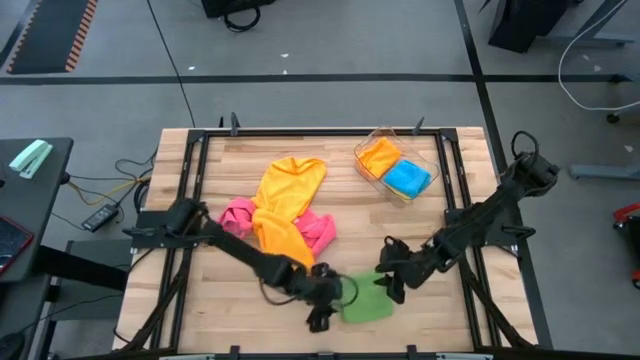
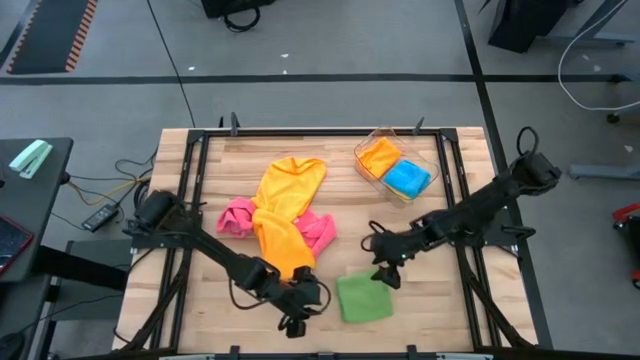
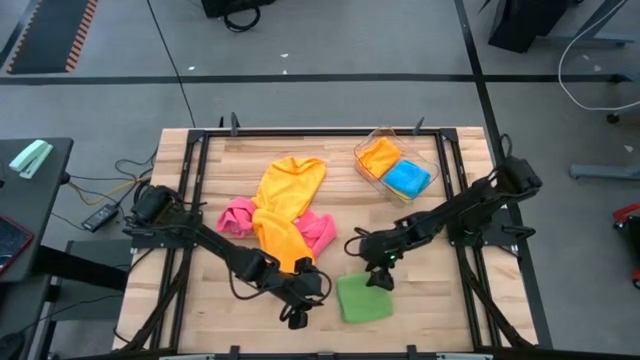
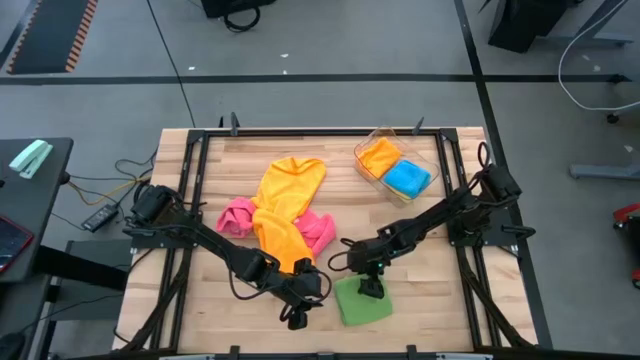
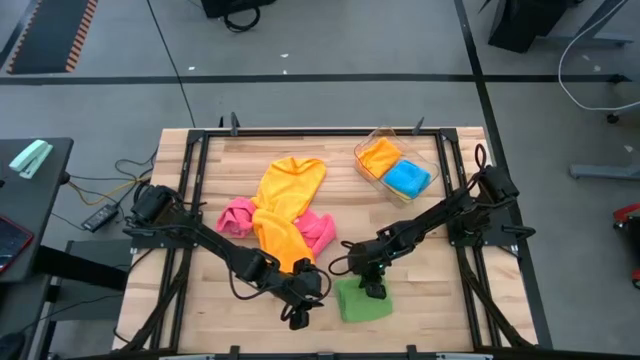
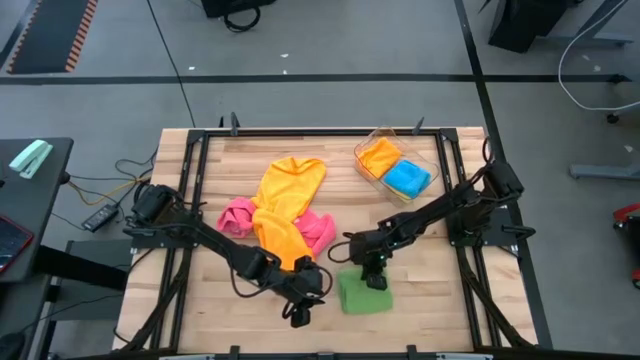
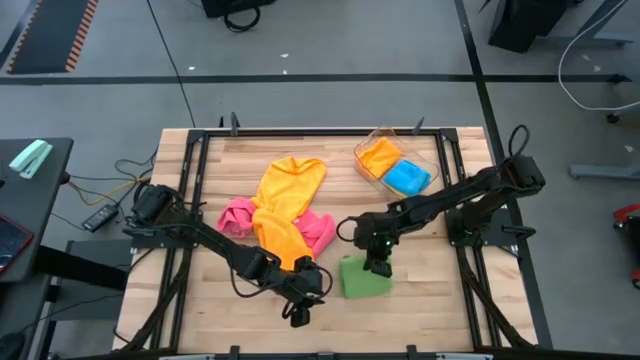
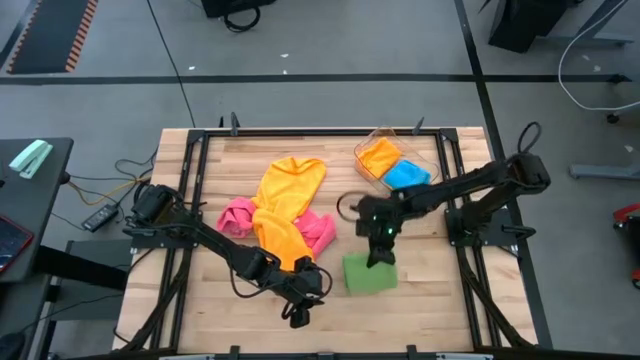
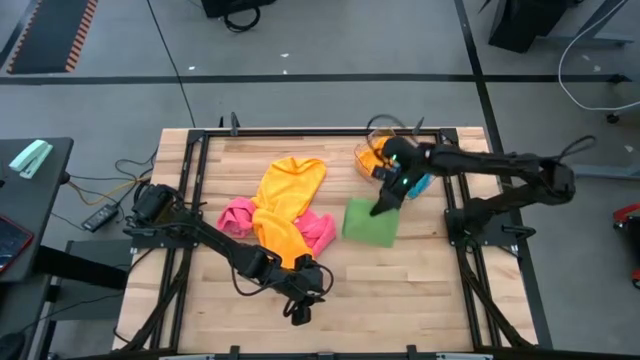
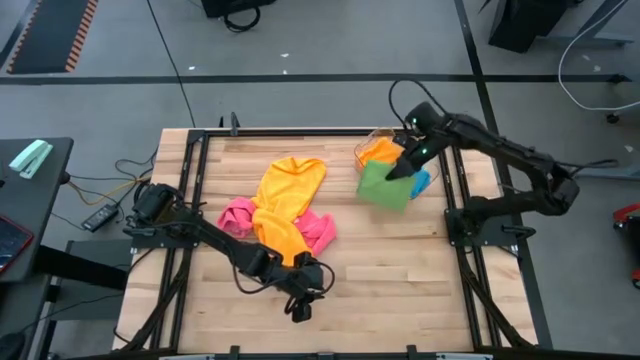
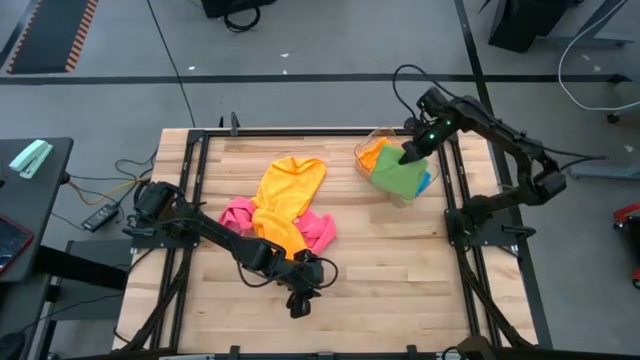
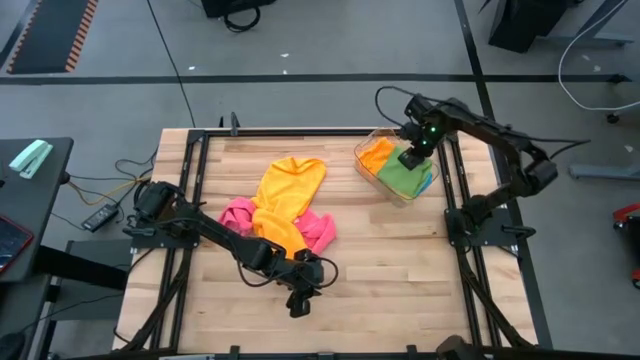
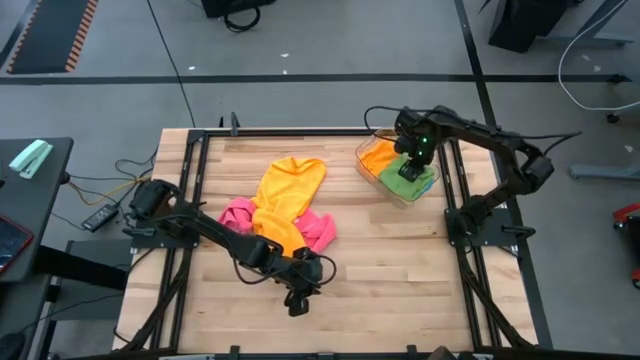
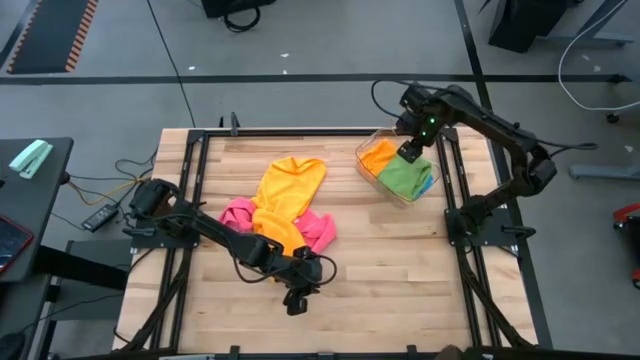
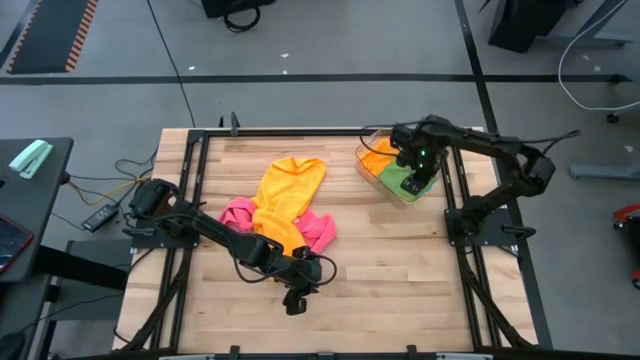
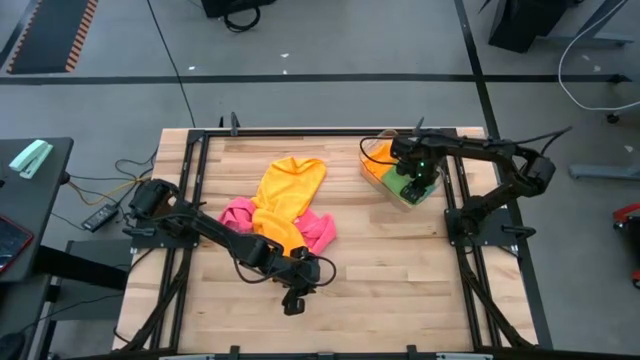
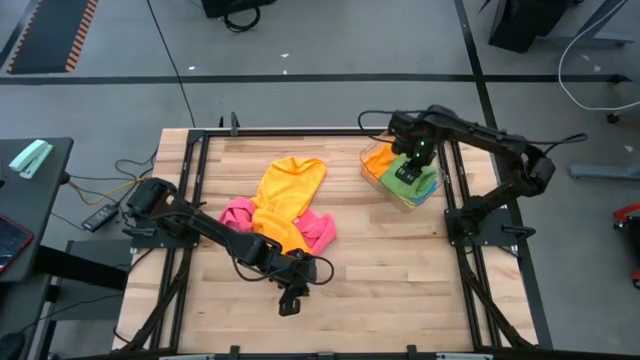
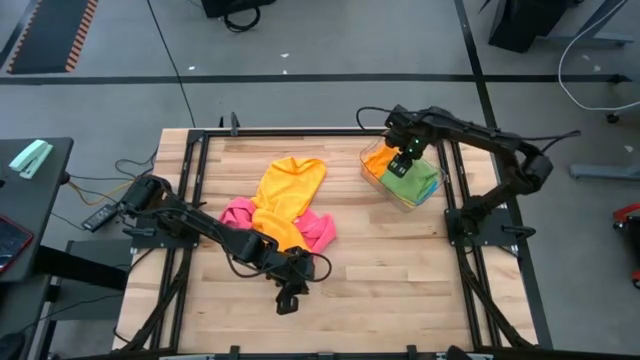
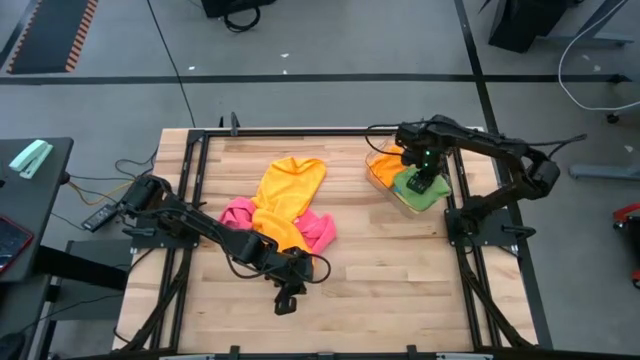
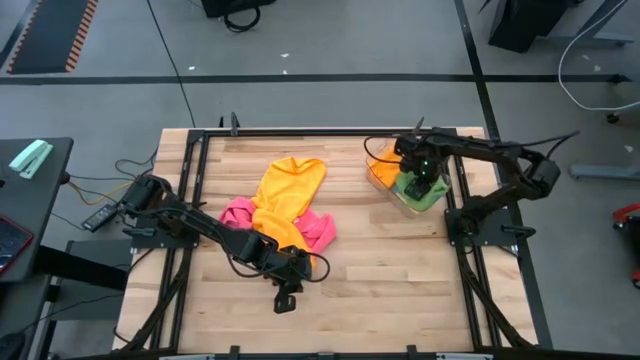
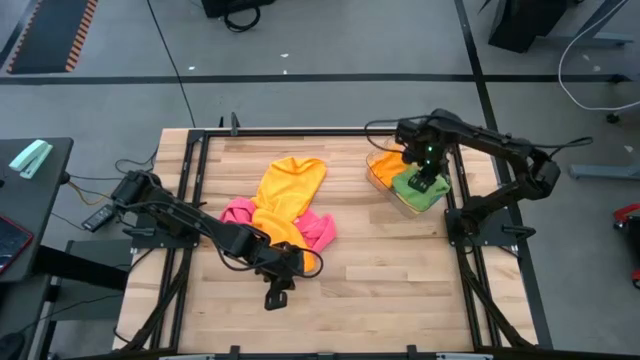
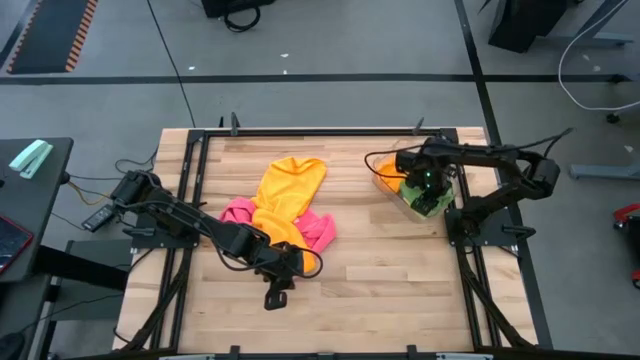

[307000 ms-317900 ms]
Task: Fold microfiber towels
Put the green towel into the transparent bin

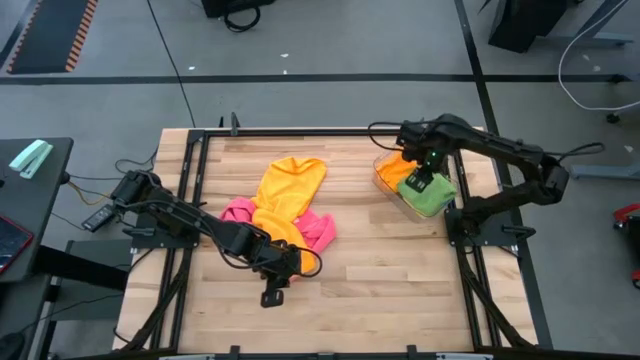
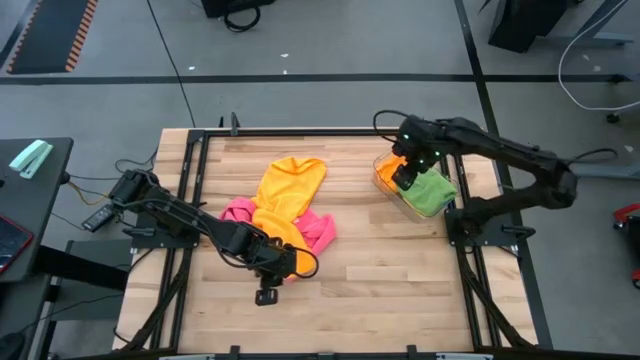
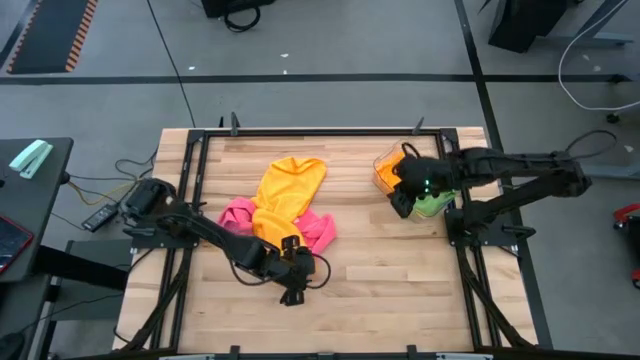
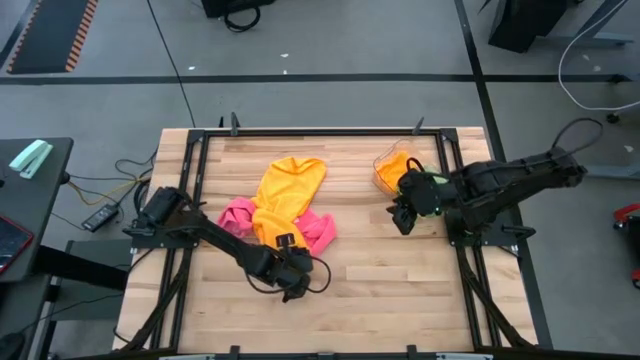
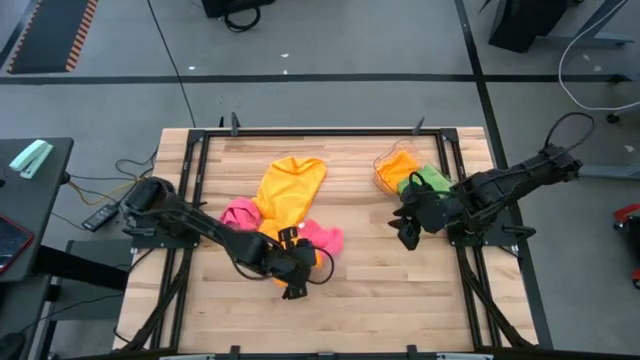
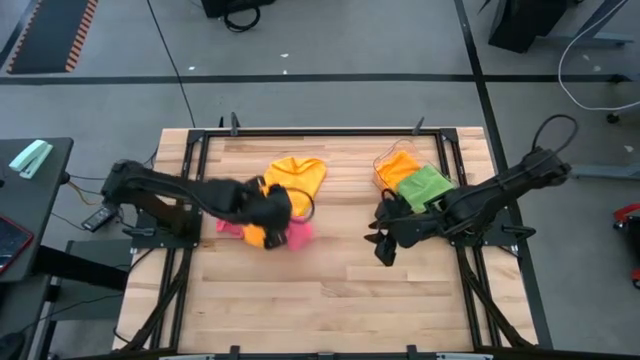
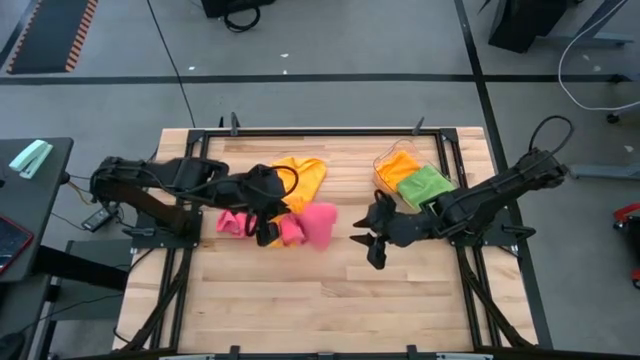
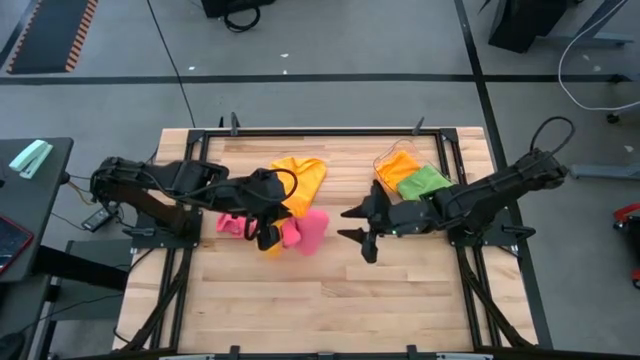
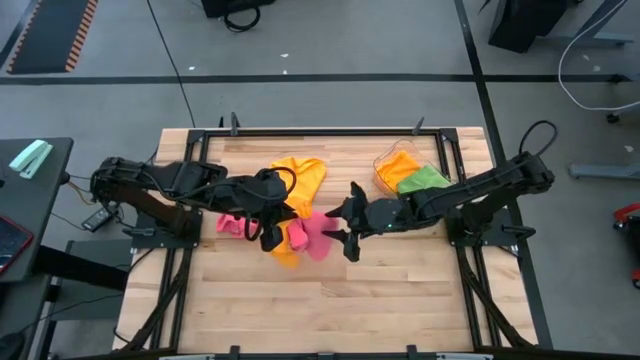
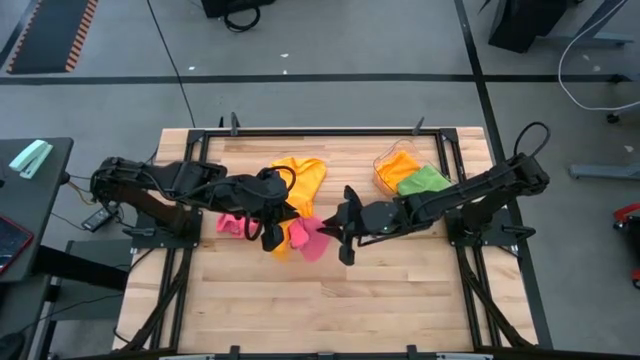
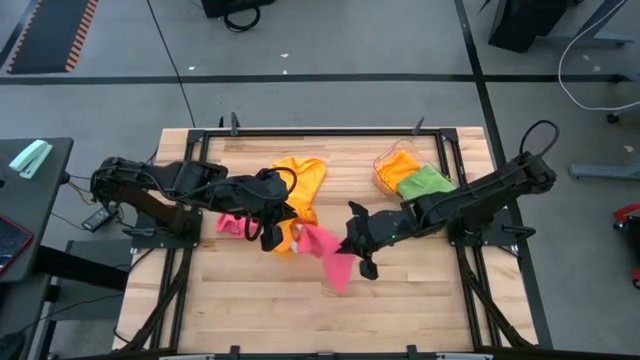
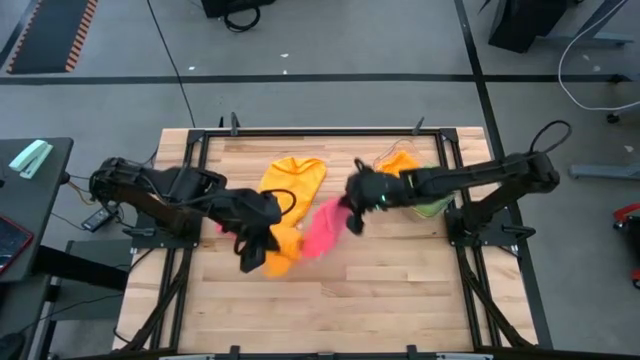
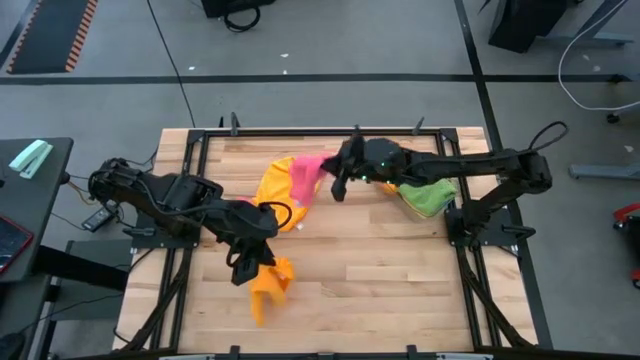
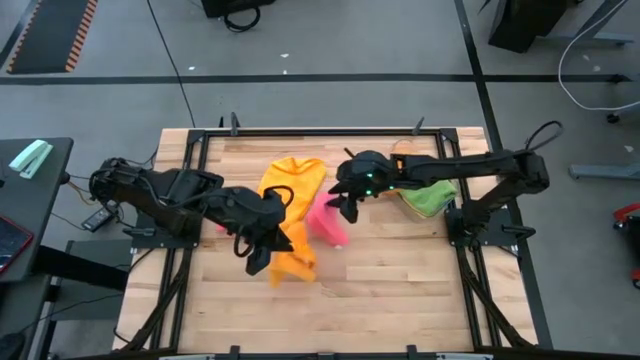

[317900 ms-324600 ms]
Fold the bottom orange towel

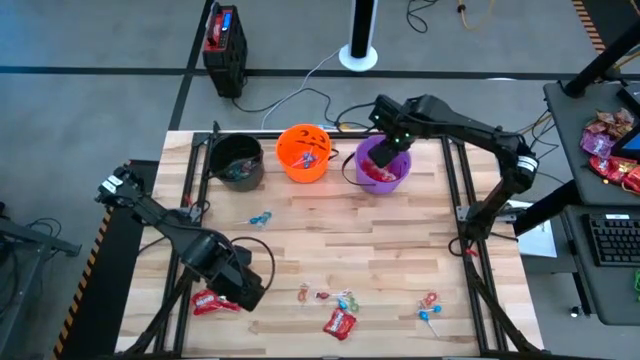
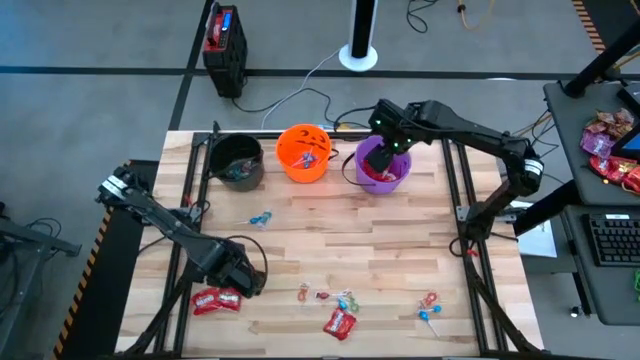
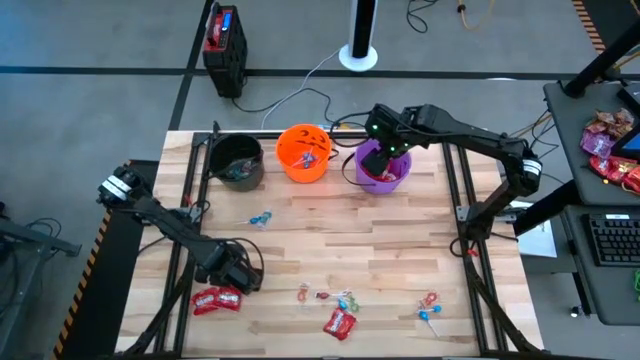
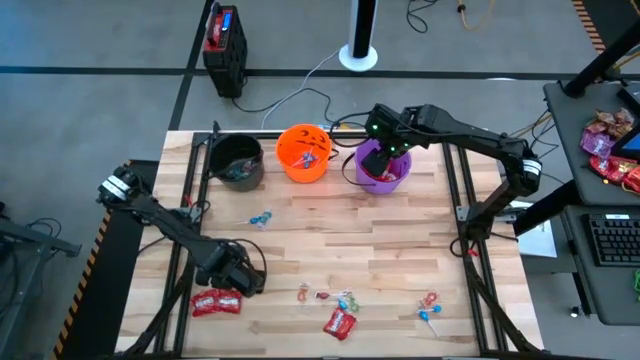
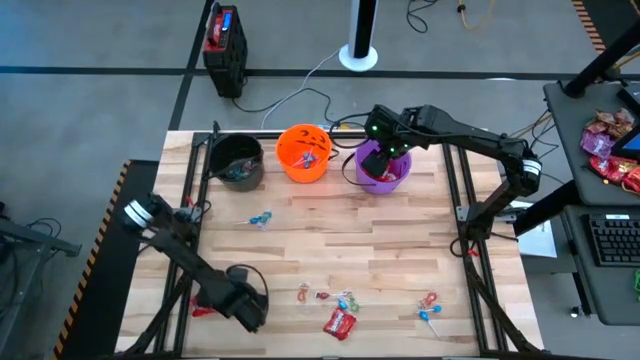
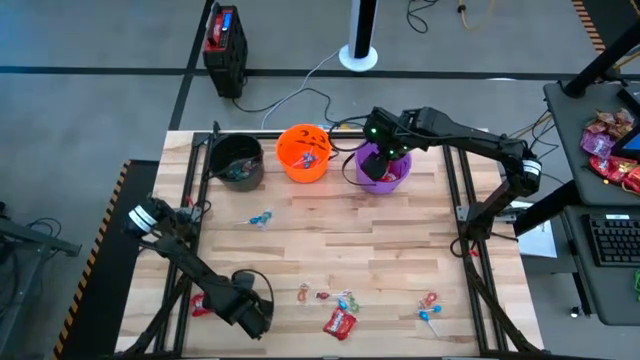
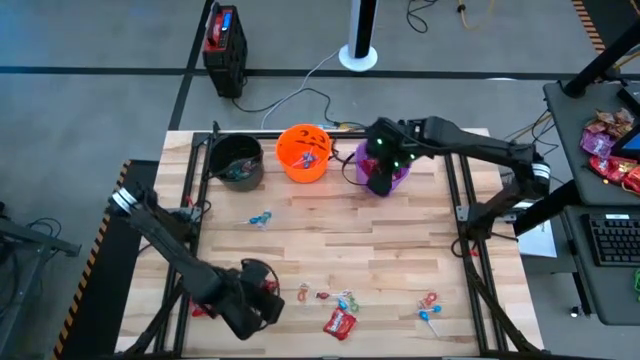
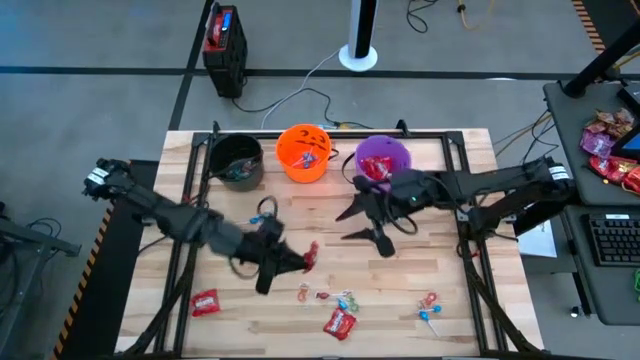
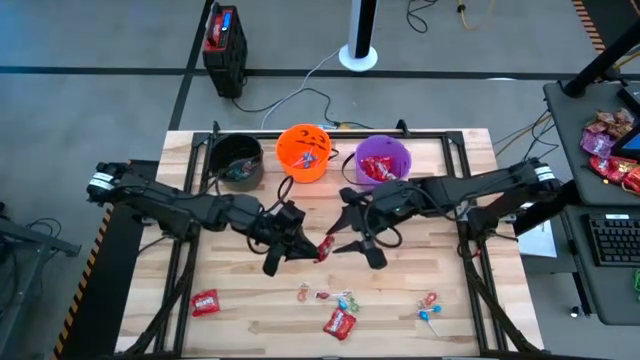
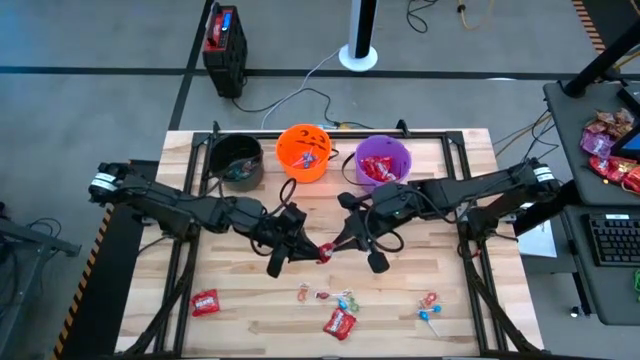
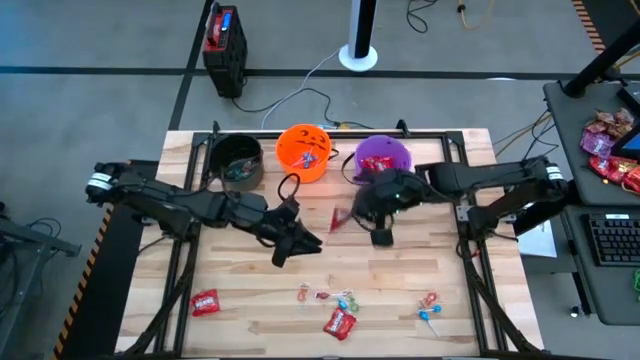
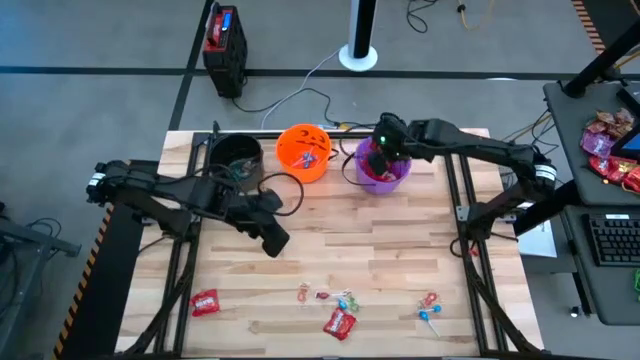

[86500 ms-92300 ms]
Task: Sort candy by brand, put in halloween buckets
Put the red candy into the violet bucket
